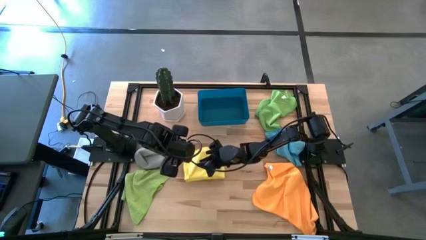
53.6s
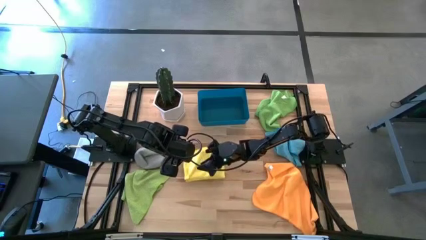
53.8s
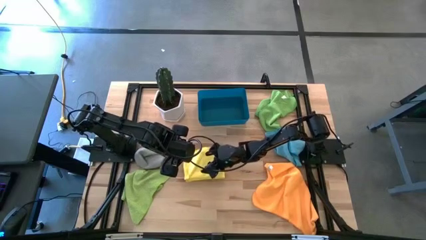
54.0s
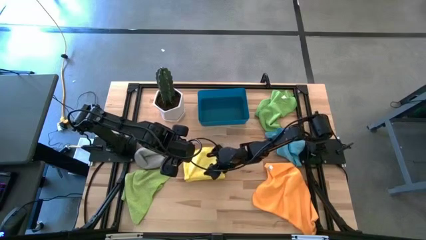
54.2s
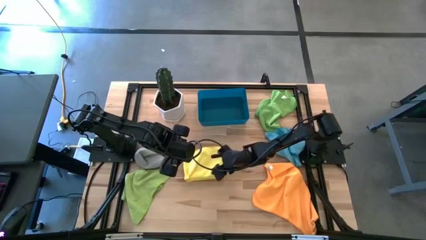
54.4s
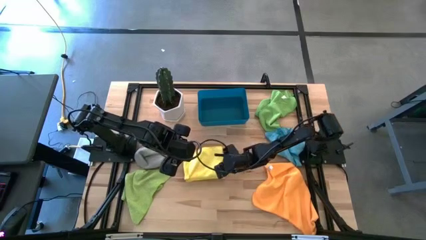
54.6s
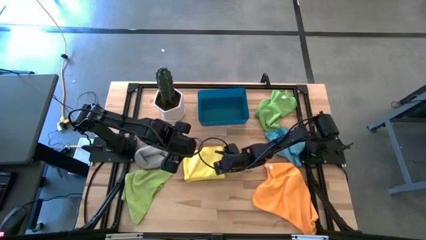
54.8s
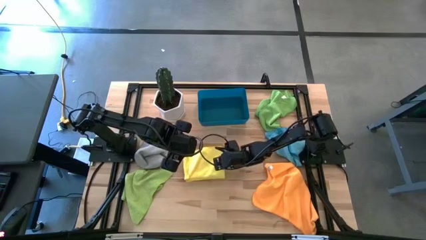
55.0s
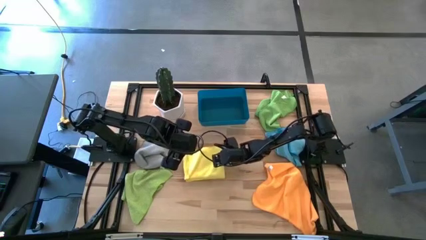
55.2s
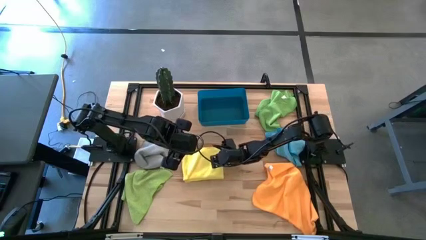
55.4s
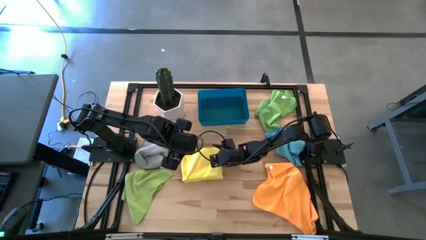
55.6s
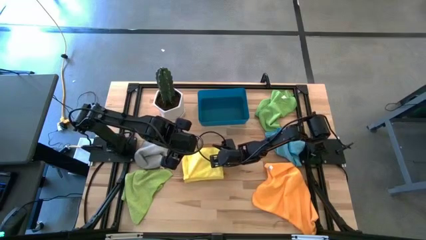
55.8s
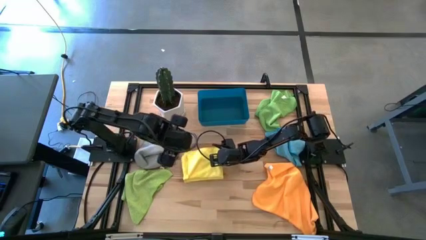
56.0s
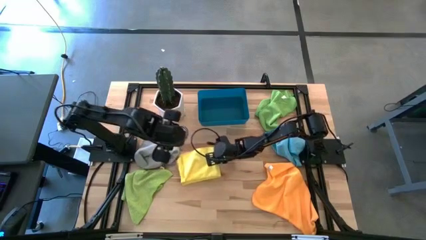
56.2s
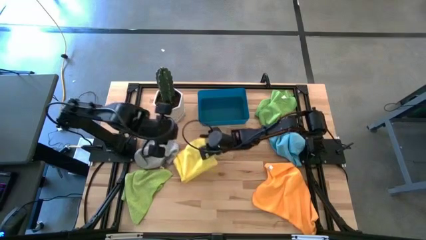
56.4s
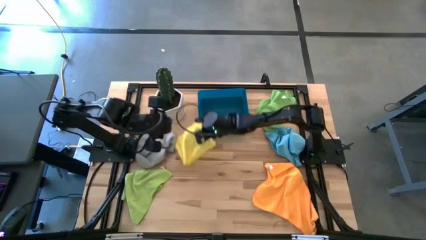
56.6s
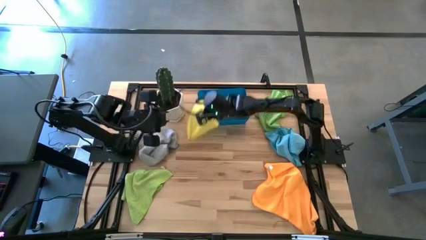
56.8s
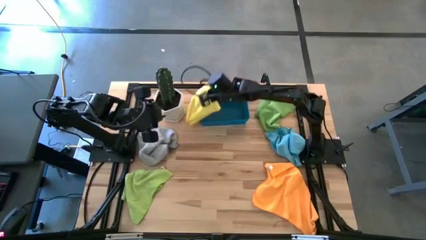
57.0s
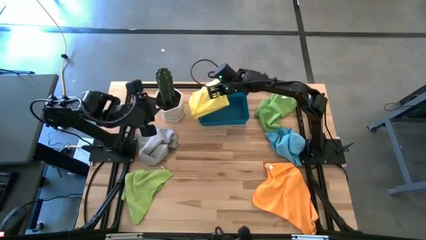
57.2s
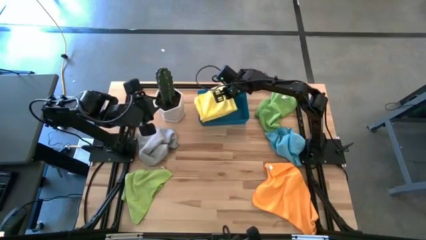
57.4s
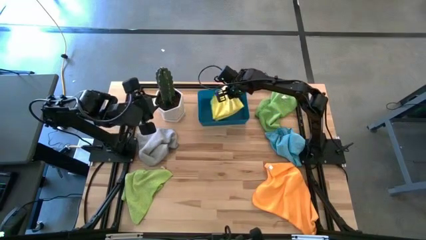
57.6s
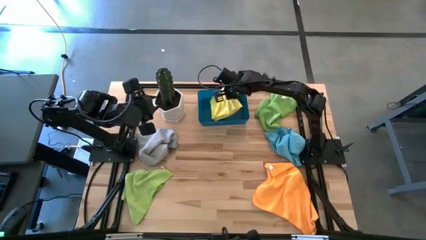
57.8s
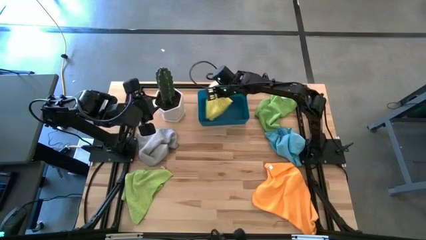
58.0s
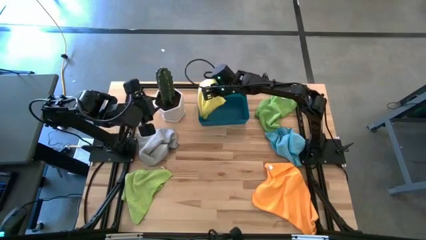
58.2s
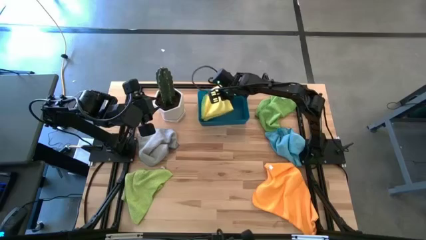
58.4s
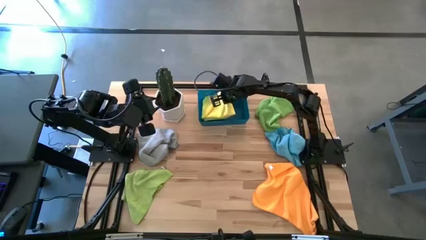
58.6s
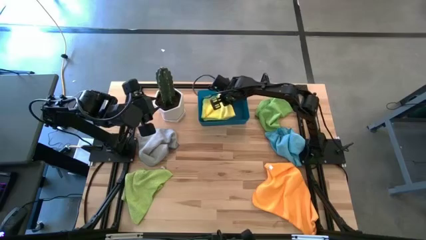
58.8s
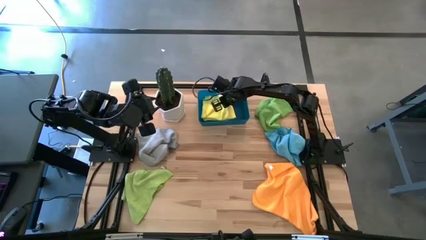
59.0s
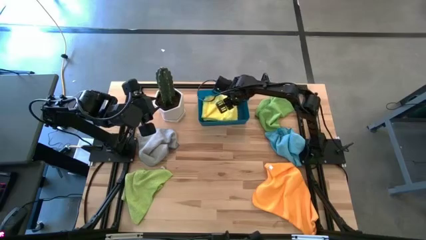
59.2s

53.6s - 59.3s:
Task: Fold microfiber towels
Put the yellow microfiber towel into the blue bin

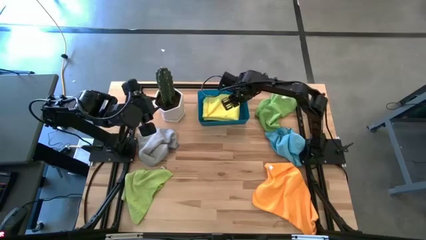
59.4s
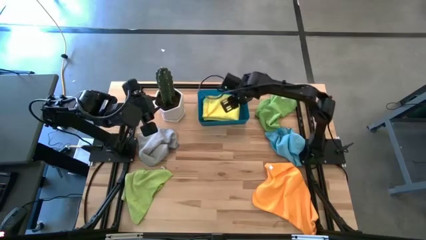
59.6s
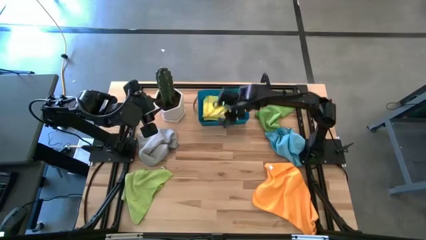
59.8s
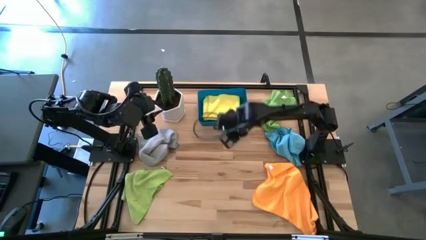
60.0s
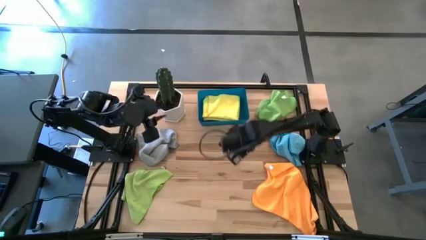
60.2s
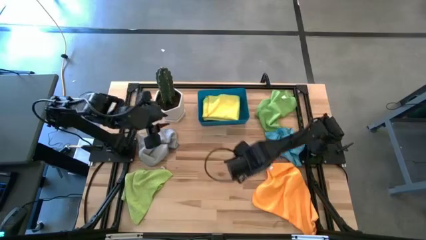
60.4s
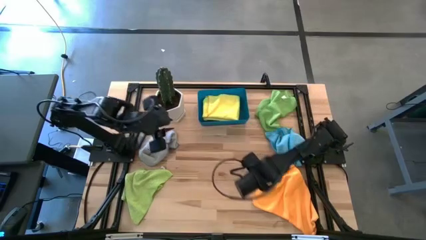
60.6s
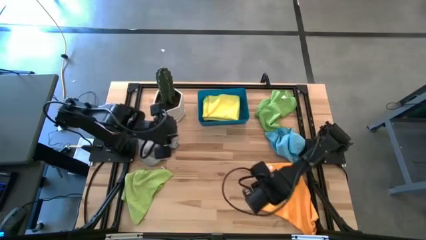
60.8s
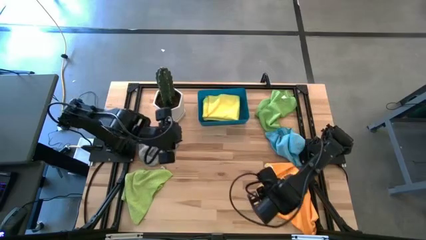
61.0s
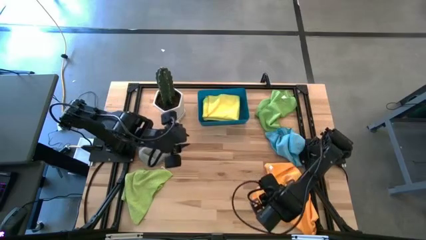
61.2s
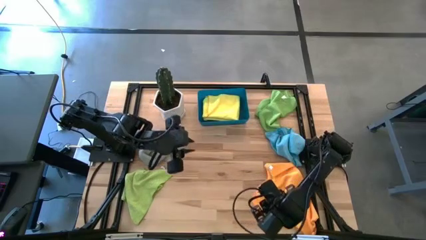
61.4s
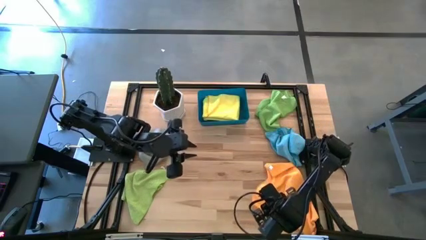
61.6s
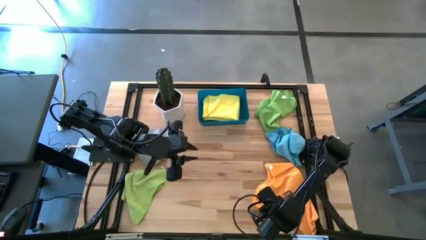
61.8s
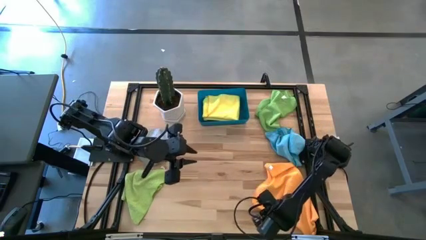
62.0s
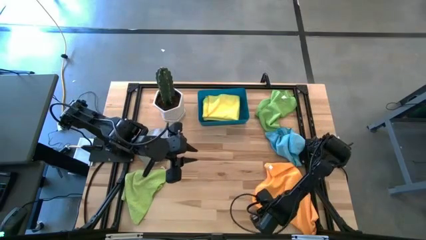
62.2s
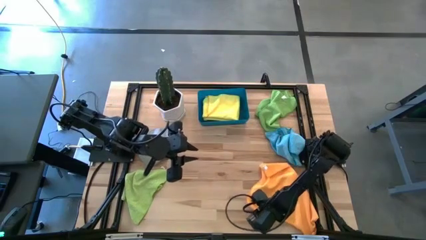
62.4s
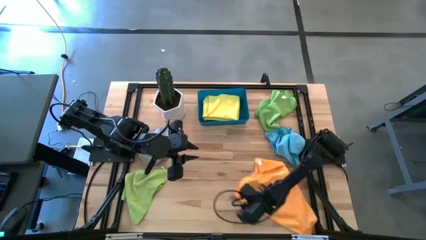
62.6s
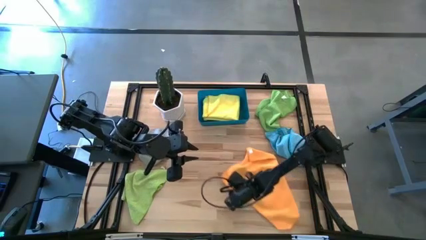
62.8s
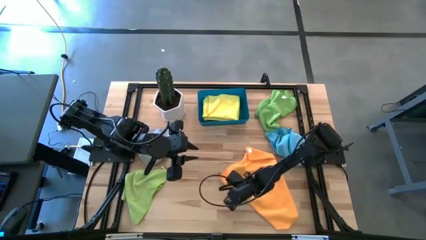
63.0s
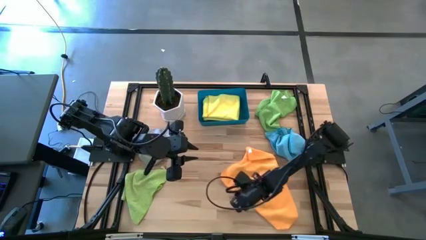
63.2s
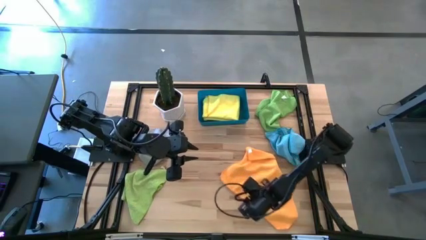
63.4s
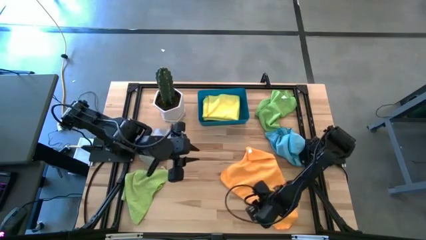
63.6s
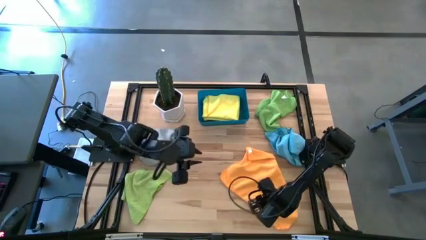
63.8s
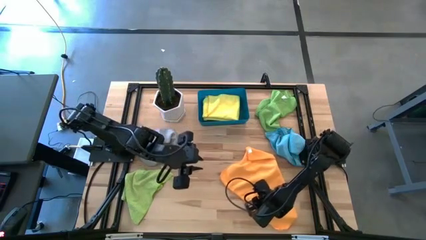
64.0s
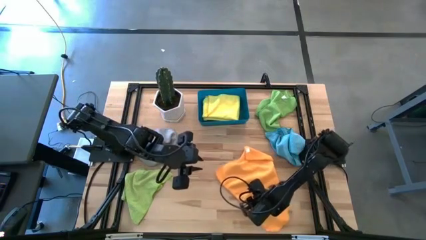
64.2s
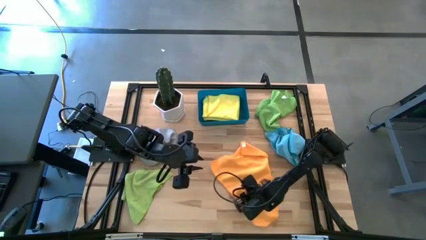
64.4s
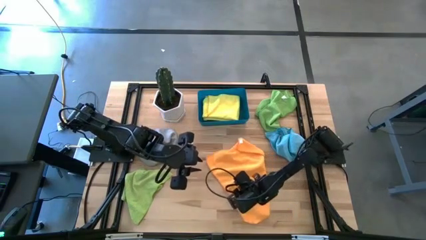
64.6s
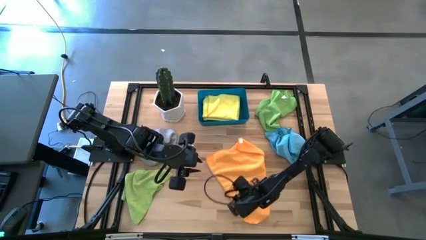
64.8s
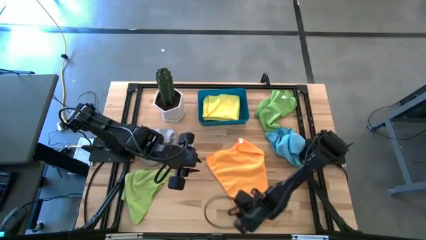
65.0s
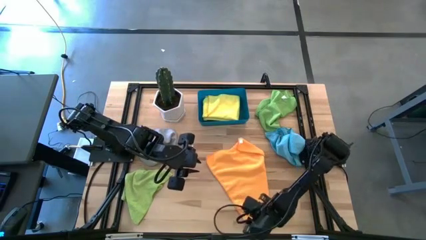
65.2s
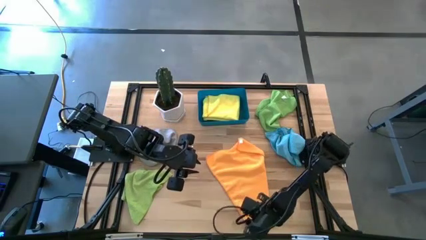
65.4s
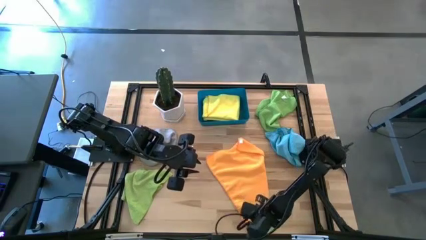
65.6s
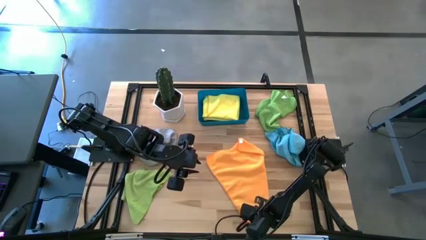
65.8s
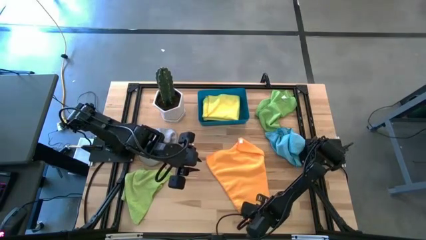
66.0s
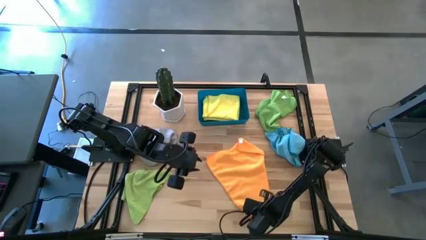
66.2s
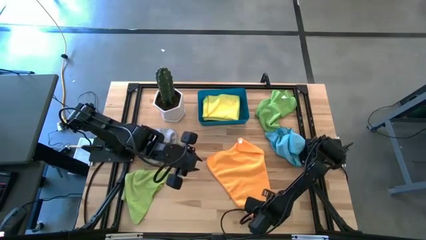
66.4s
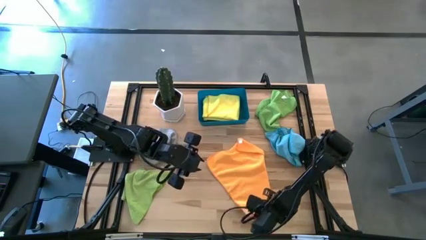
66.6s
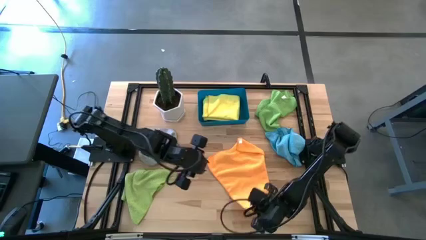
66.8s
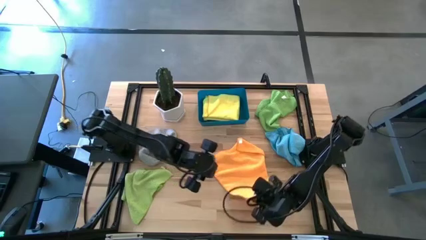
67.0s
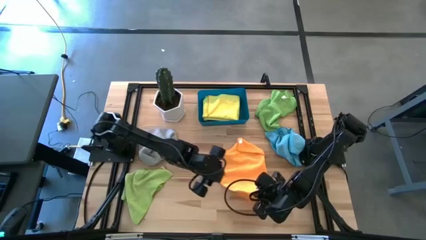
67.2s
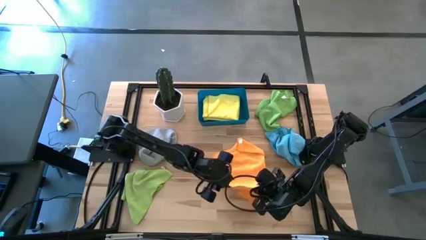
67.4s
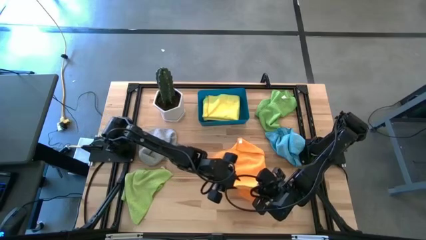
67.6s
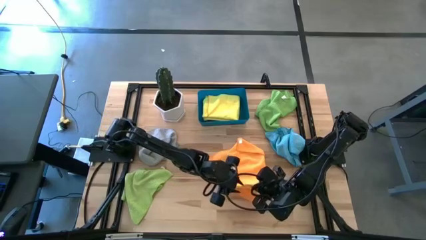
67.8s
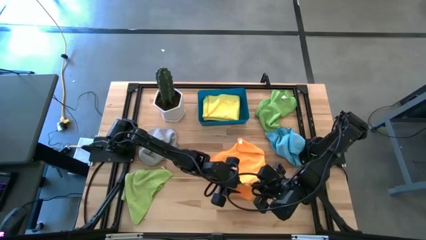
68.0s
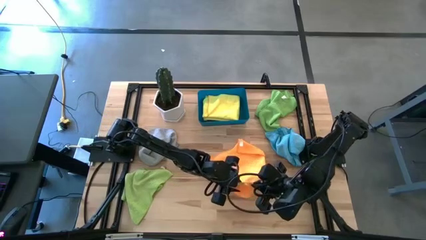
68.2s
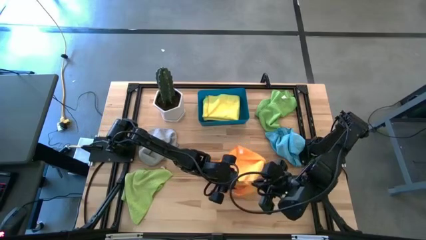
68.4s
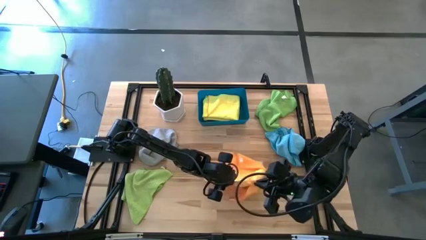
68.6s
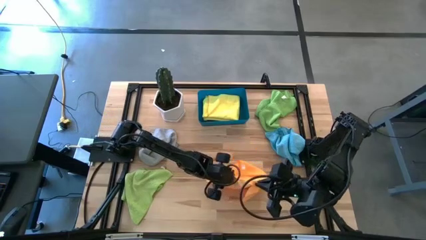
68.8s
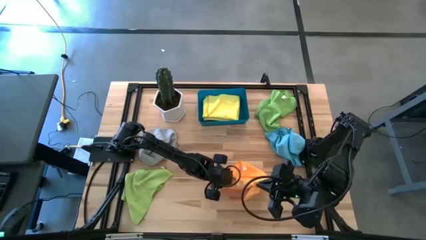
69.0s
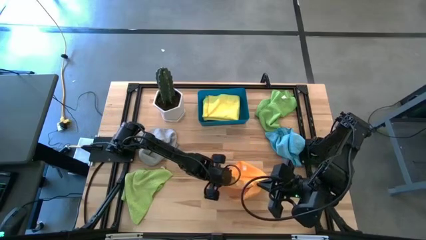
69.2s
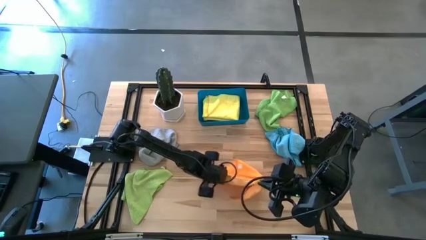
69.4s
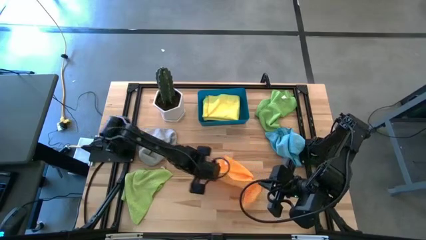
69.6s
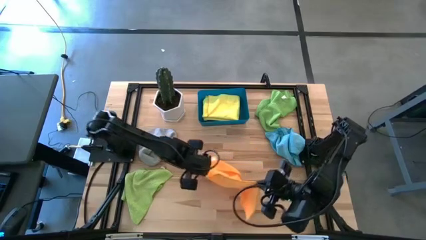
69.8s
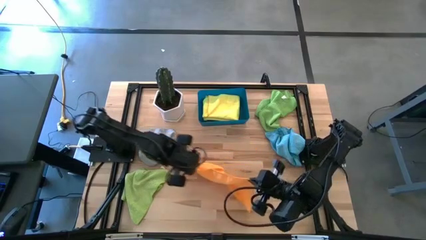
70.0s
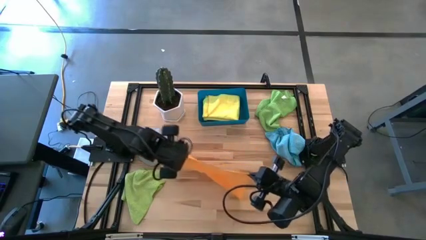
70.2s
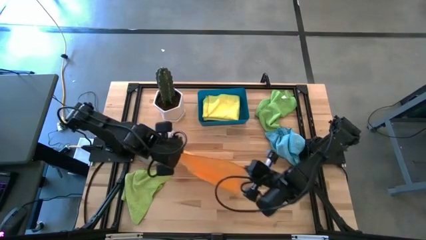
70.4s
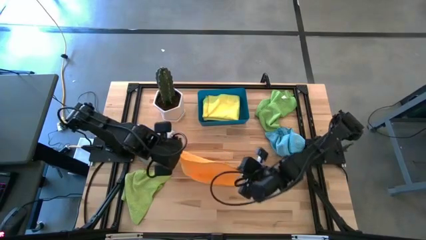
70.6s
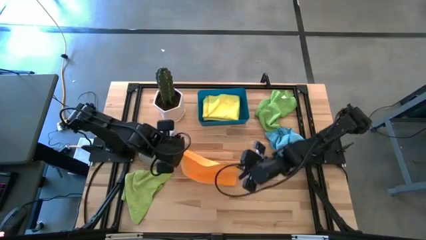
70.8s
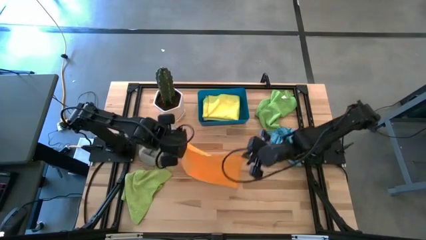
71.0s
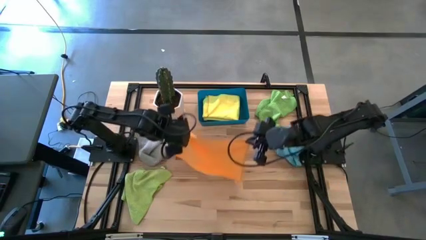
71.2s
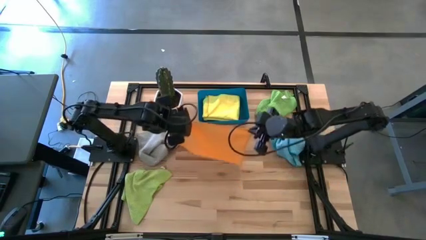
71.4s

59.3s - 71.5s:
Fold the orange microfiber towel
